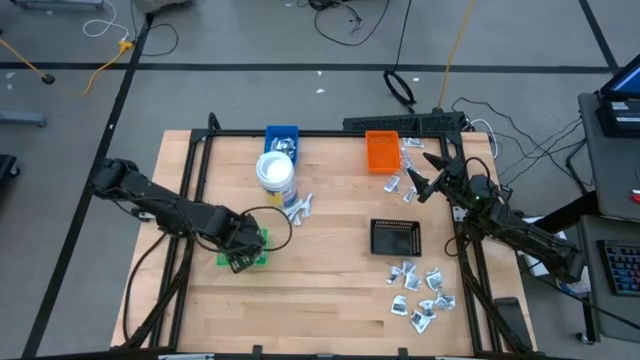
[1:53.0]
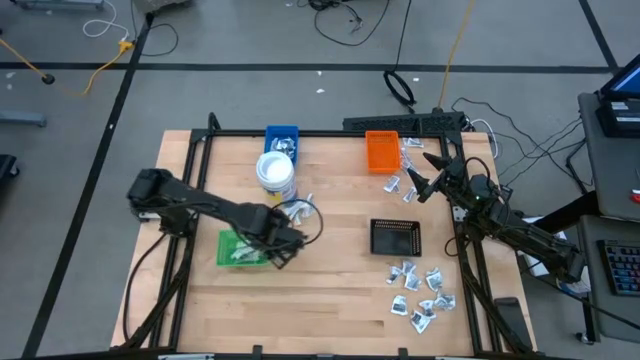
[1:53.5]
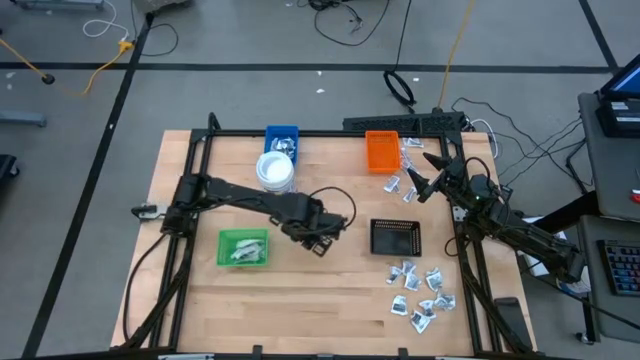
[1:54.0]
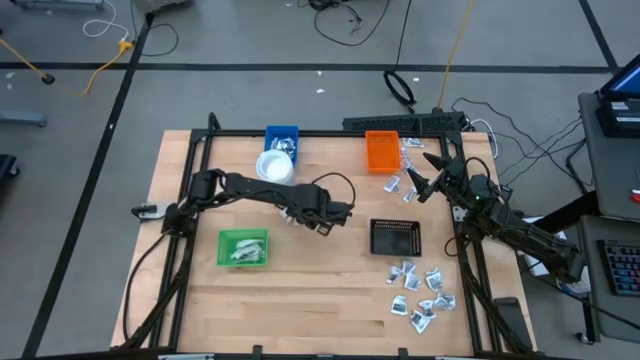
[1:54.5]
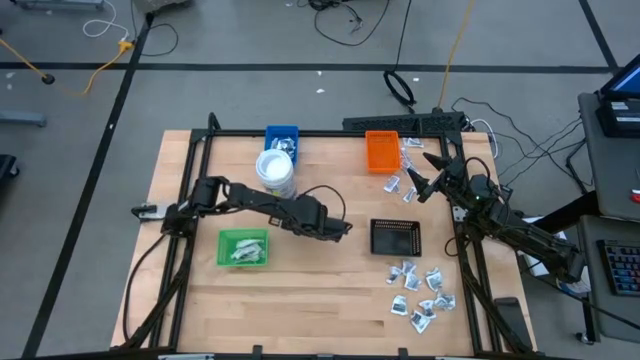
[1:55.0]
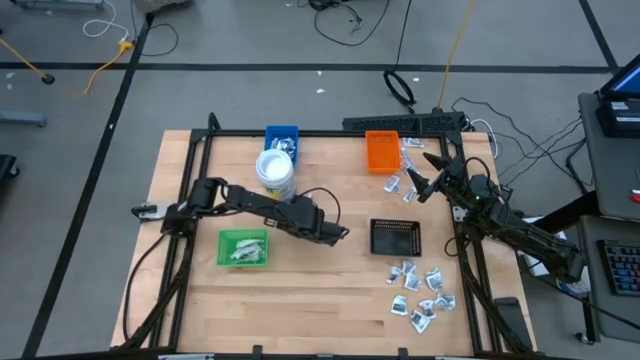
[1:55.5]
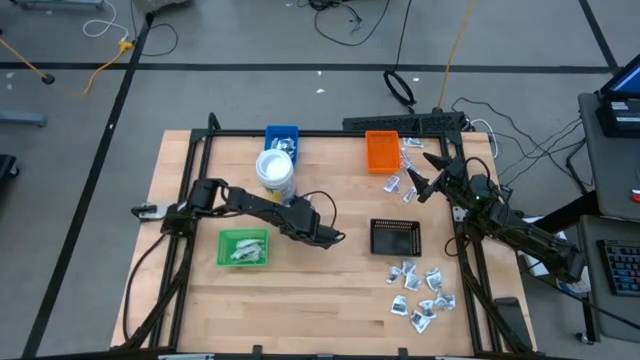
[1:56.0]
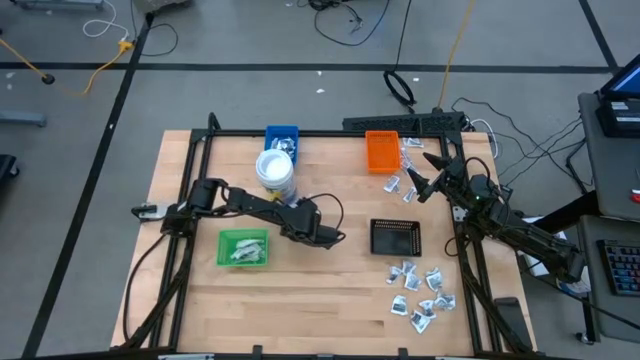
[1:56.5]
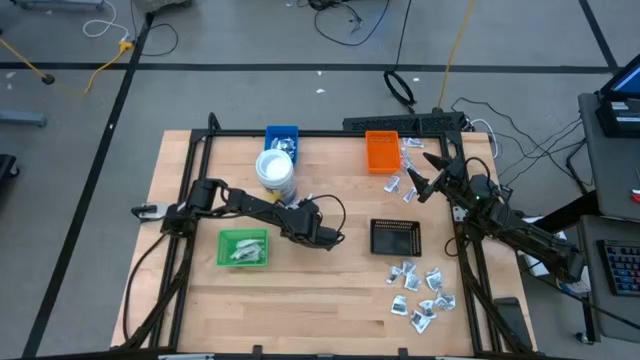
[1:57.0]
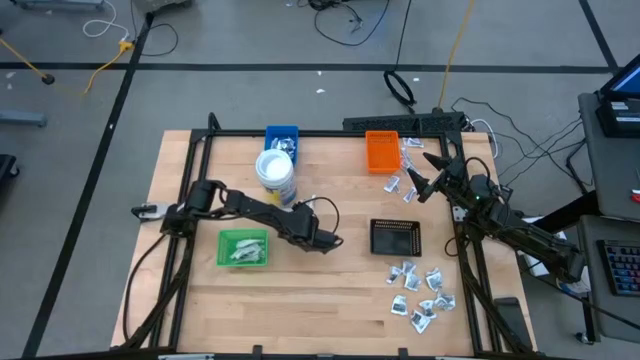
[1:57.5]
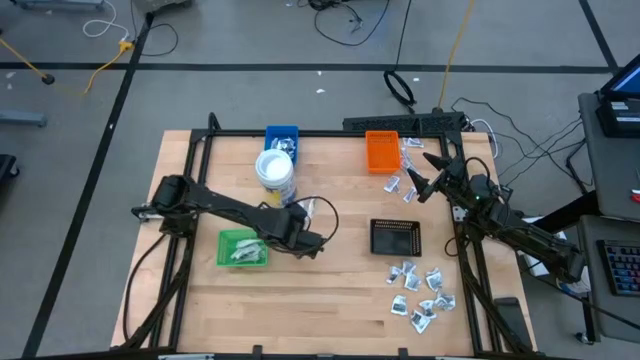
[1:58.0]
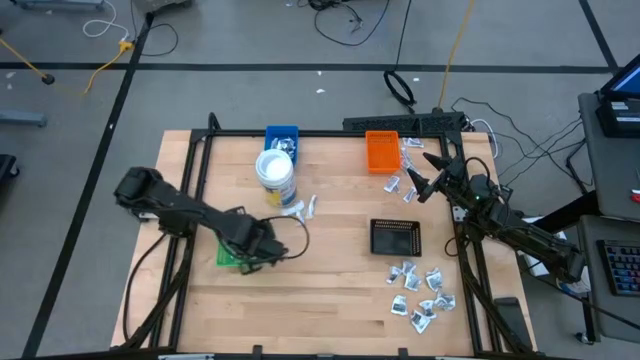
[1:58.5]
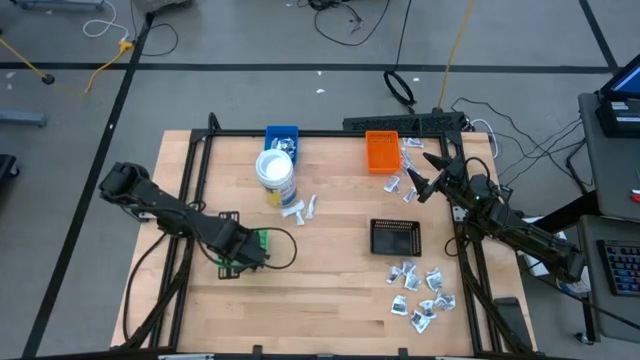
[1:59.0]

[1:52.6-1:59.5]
Task: Pick & Place First Aid Supplies
Put the green bandage pack into the green bin

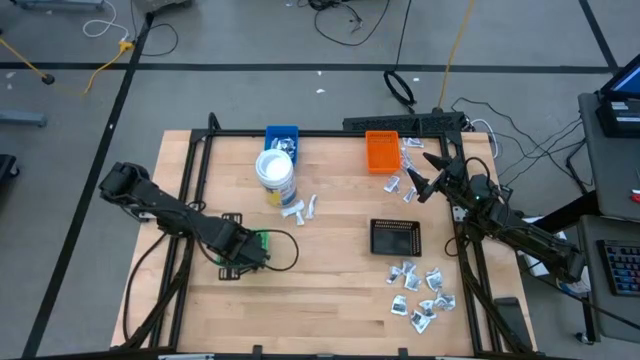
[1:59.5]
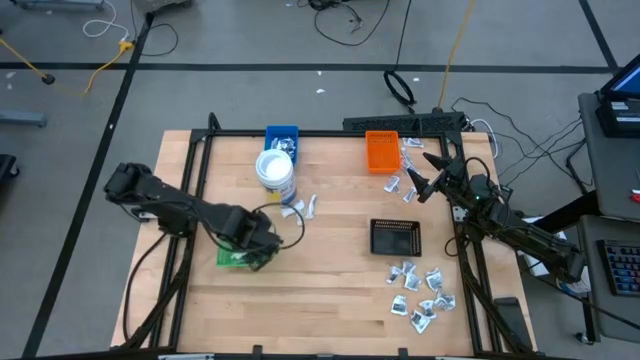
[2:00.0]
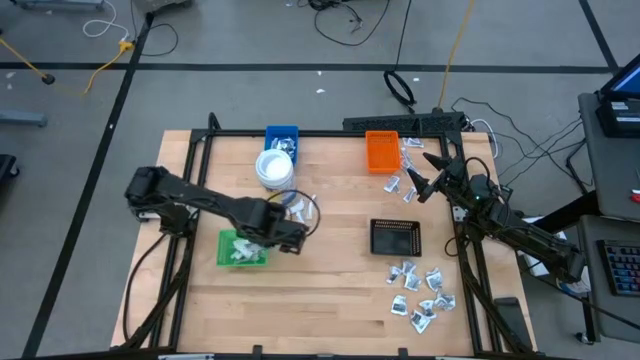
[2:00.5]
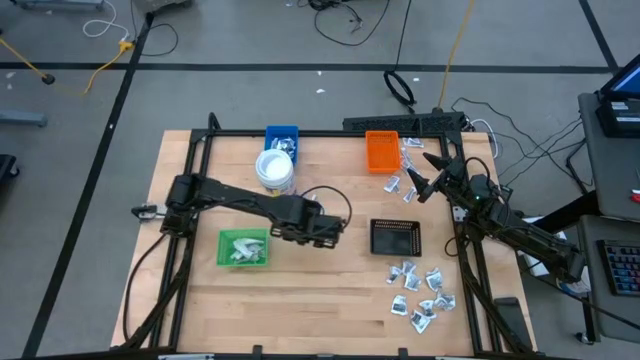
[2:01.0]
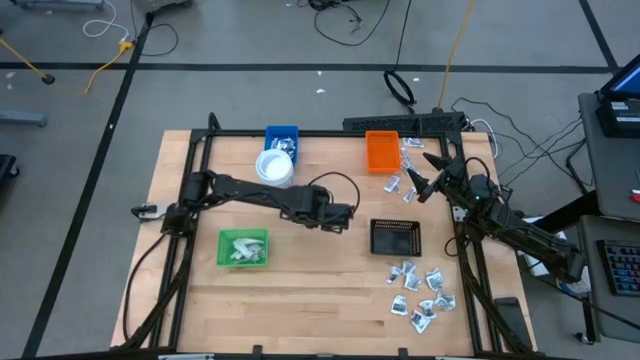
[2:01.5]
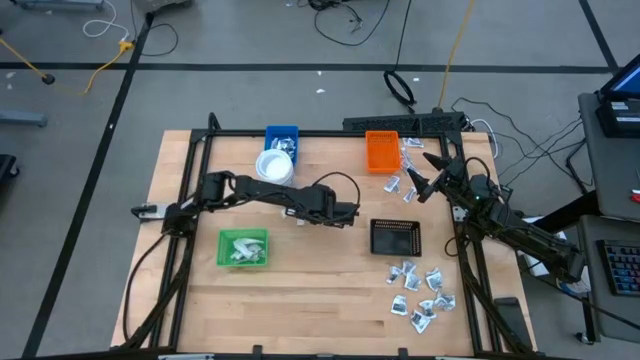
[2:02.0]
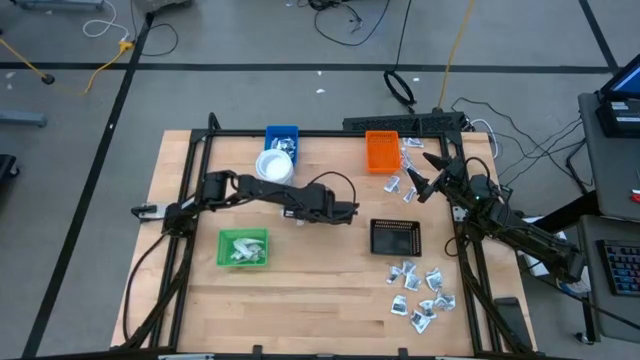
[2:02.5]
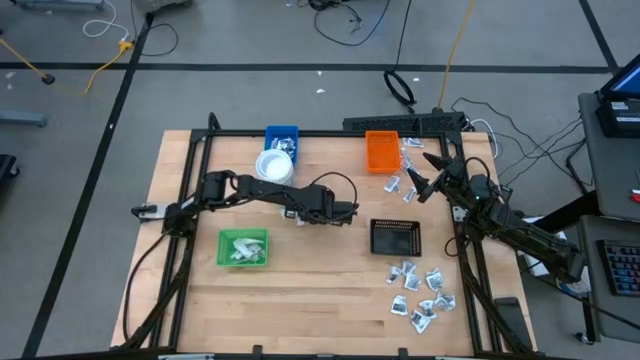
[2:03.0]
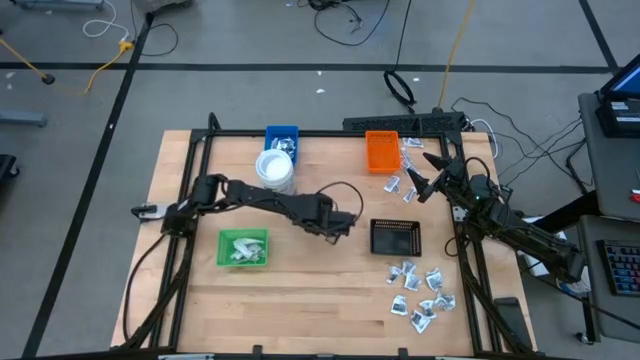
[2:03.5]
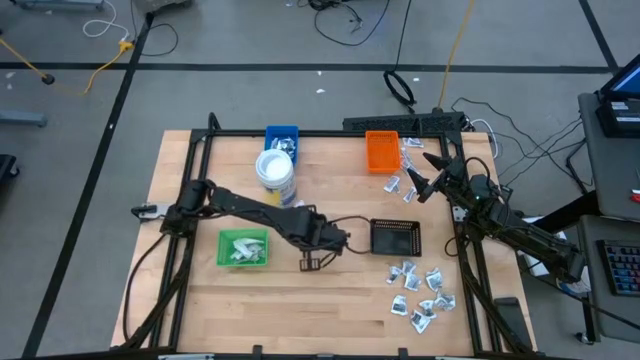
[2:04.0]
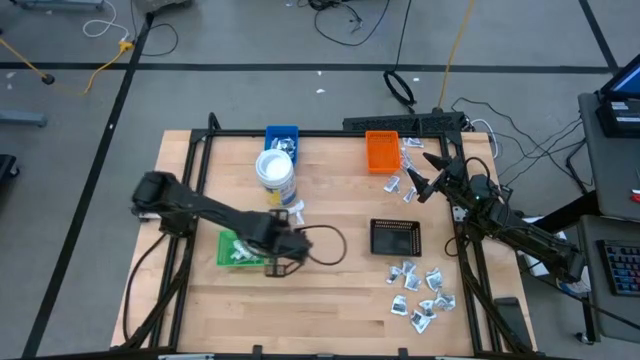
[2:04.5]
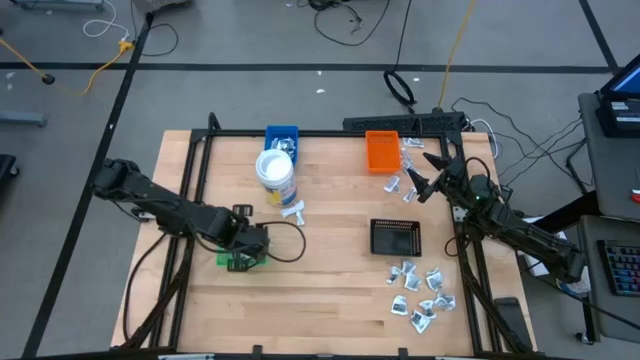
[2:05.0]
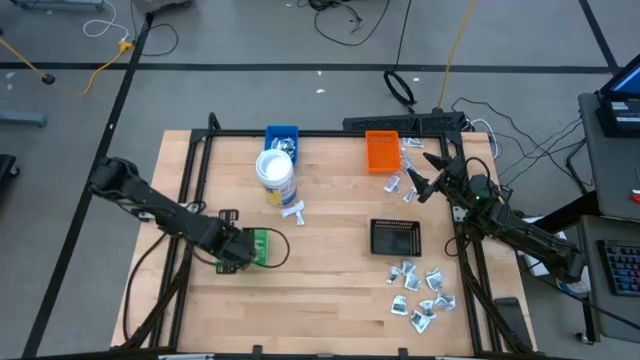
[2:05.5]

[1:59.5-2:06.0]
Put the green bandage pack into the green bin

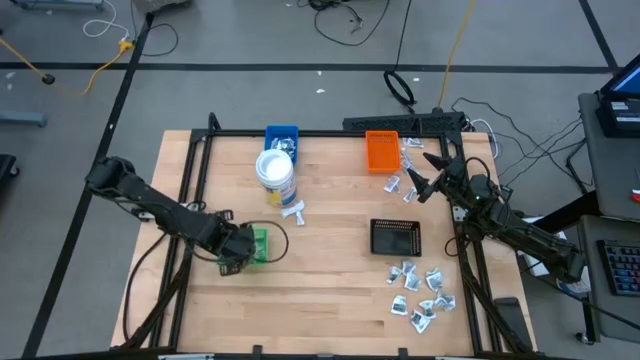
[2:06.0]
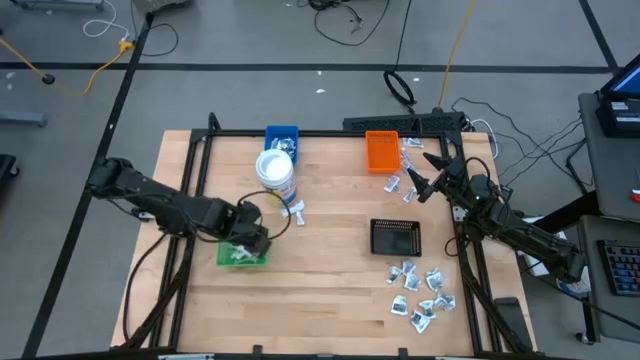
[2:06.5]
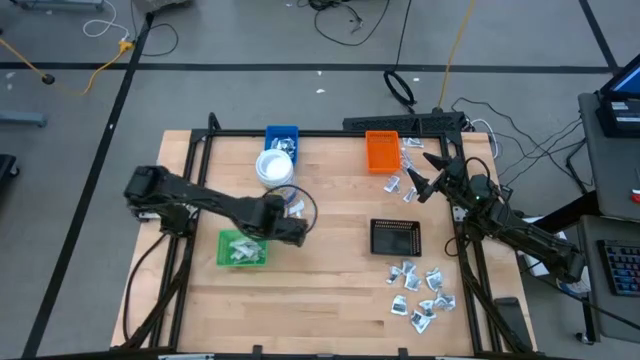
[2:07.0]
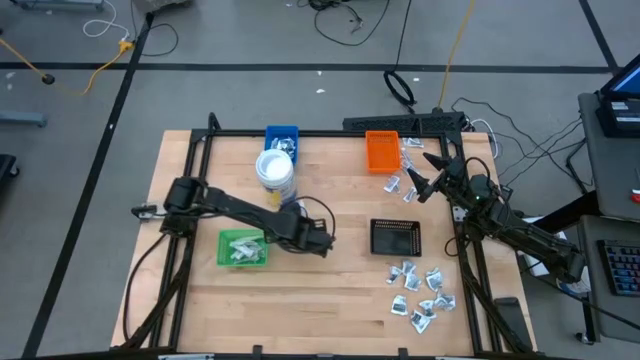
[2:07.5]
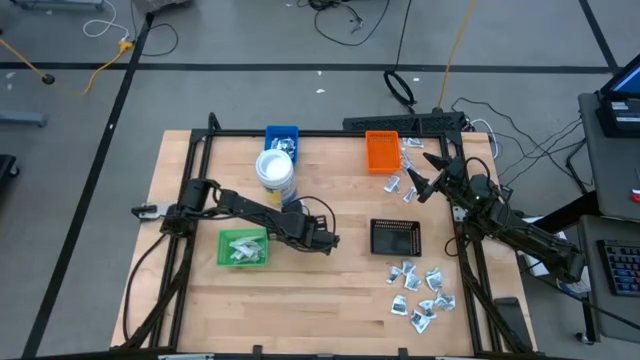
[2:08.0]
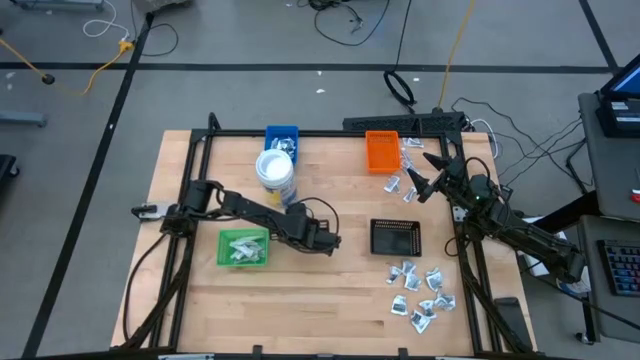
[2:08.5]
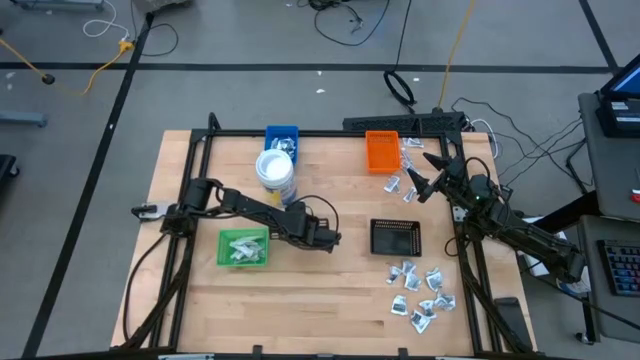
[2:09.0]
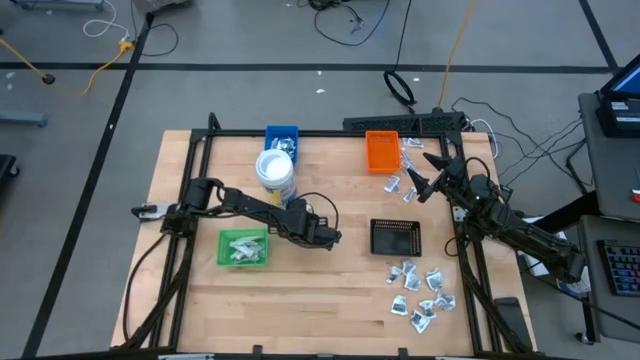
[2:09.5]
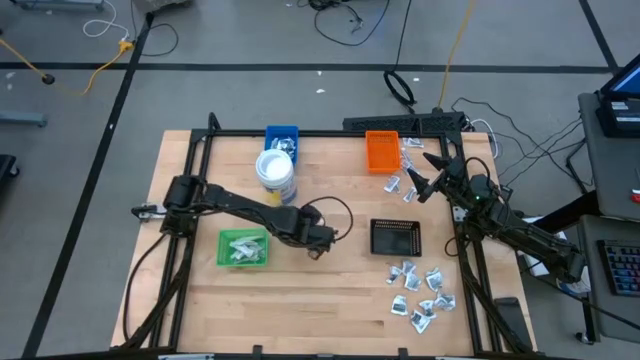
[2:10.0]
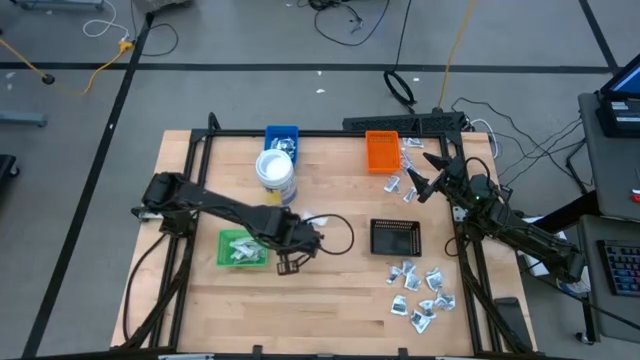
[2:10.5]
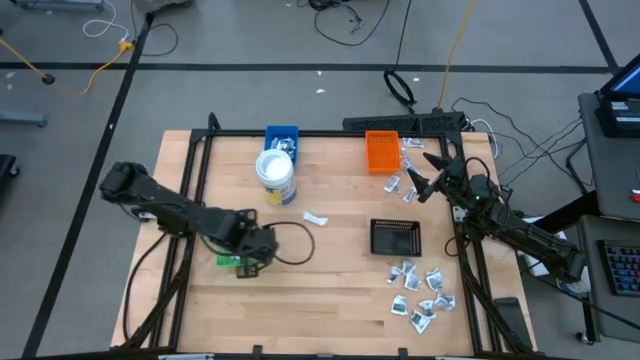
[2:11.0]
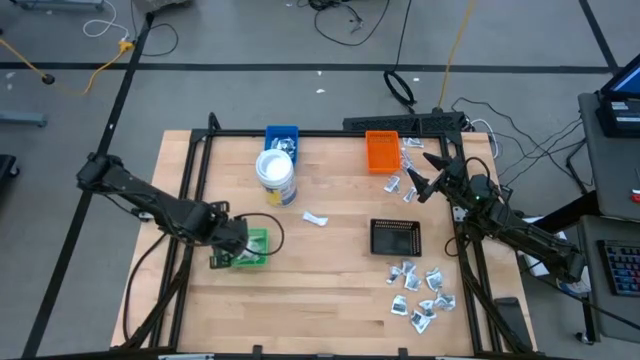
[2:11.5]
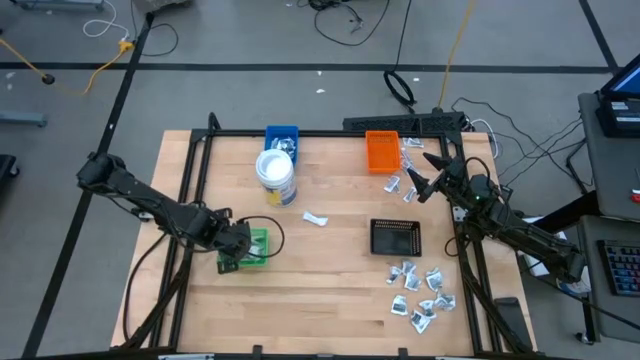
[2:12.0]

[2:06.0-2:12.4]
Put the green bandage pack into the green bin

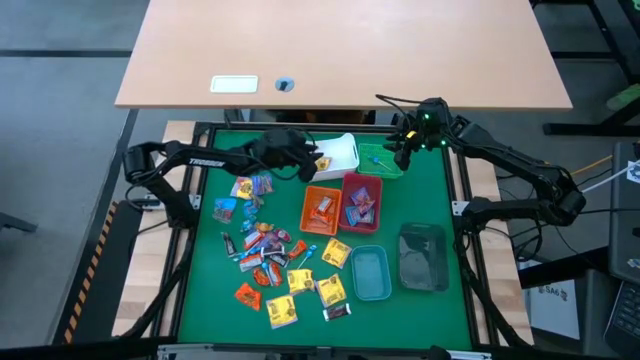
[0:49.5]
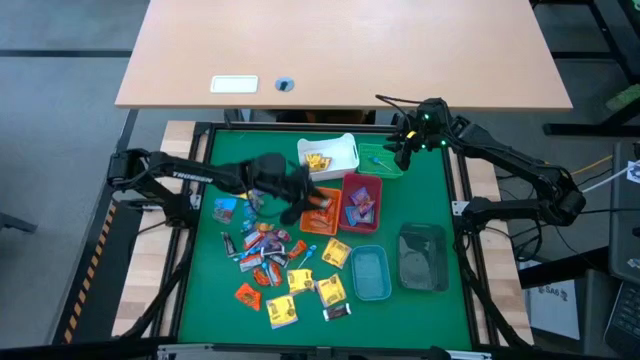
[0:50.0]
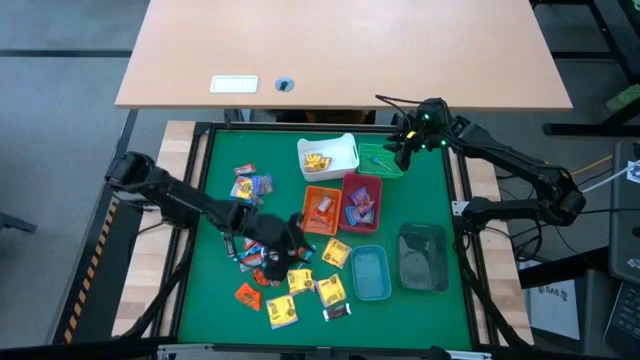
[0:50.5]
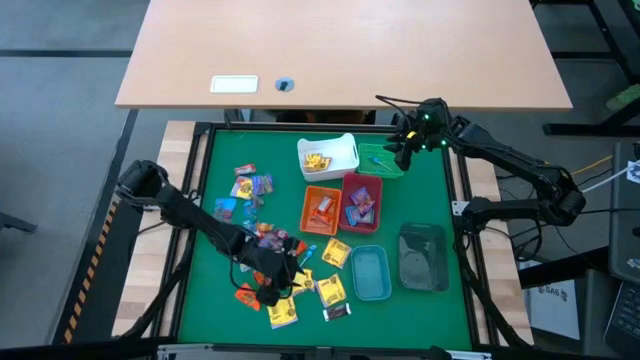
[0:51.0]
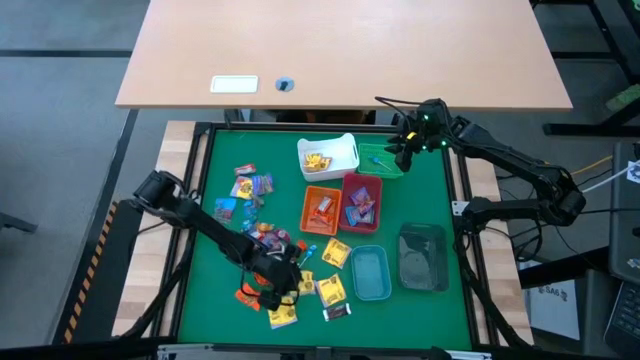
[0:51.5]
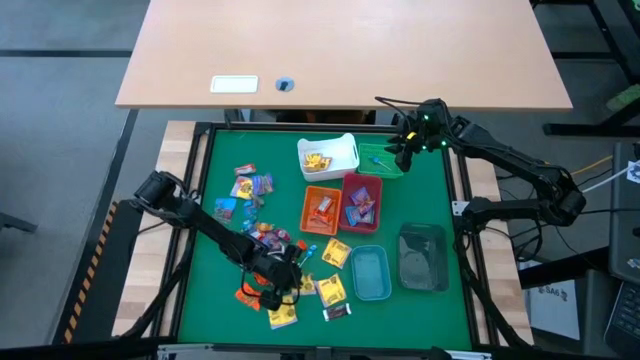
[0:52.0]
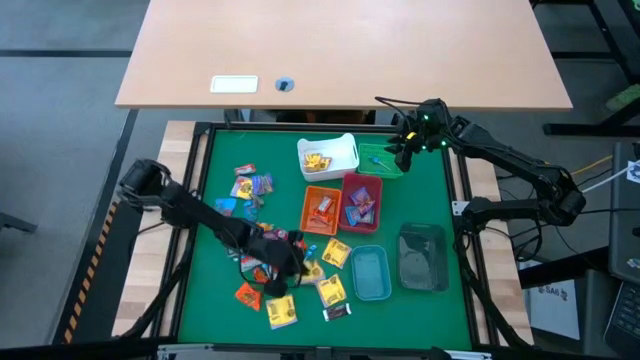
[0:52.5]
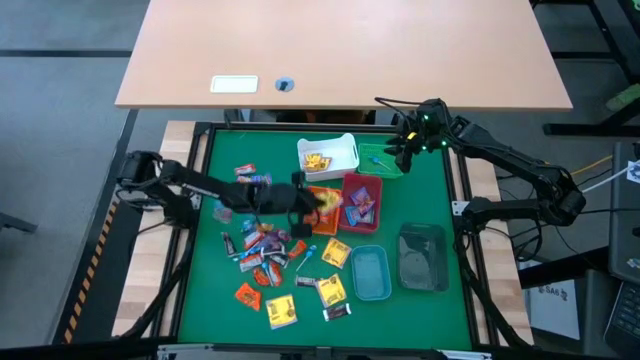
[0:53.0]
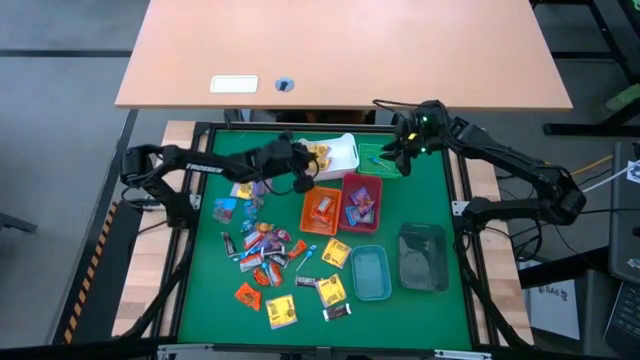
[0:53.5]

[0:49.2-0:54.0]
Task: Sort candy
Put the yellow bag of candy into the white bin
